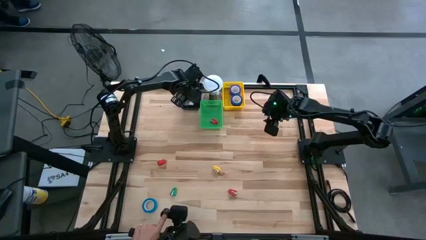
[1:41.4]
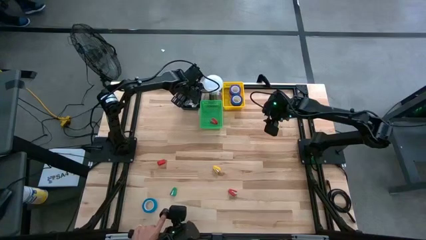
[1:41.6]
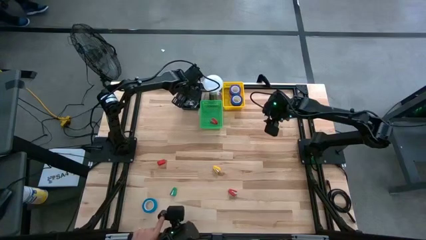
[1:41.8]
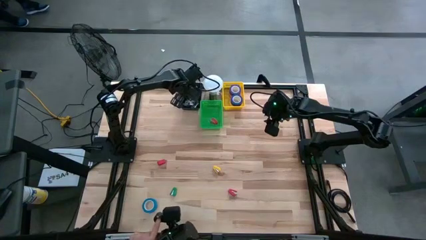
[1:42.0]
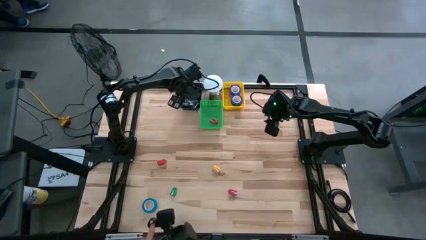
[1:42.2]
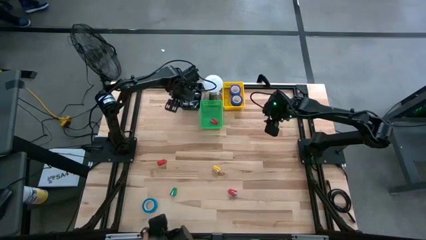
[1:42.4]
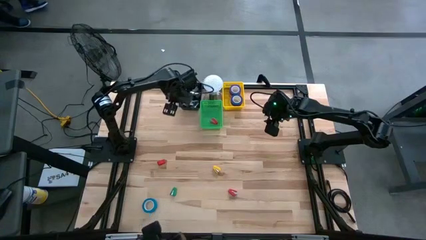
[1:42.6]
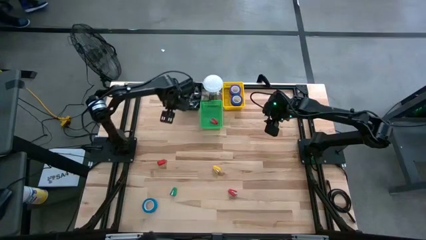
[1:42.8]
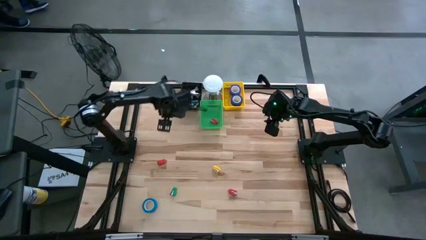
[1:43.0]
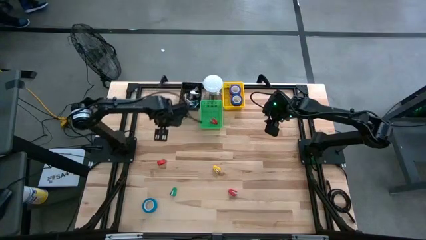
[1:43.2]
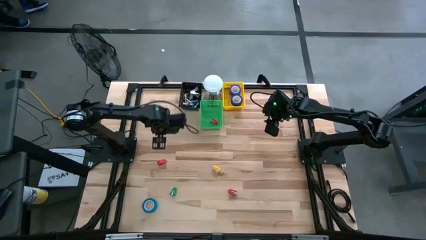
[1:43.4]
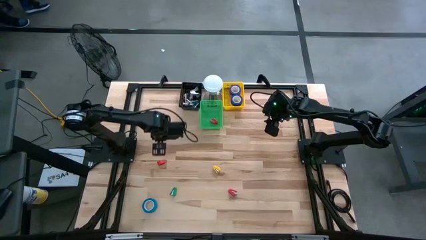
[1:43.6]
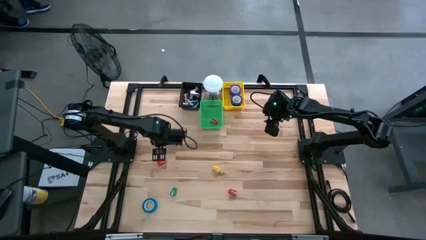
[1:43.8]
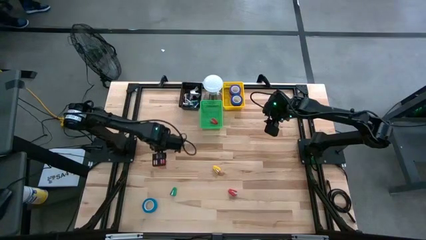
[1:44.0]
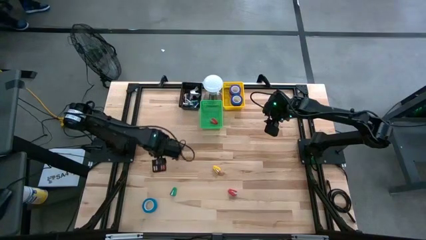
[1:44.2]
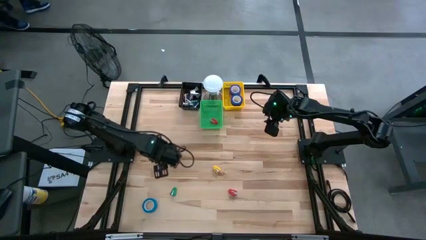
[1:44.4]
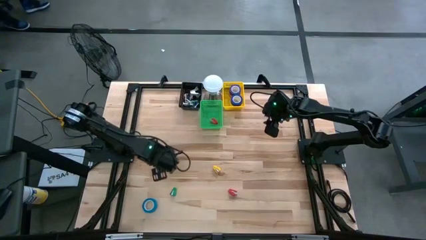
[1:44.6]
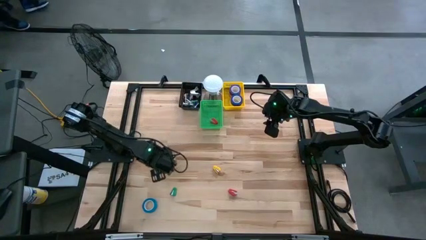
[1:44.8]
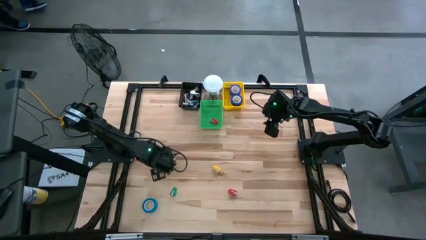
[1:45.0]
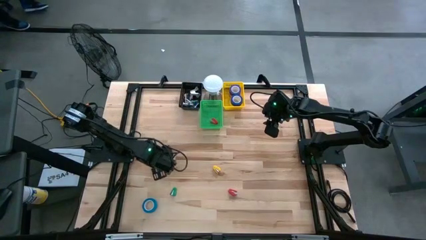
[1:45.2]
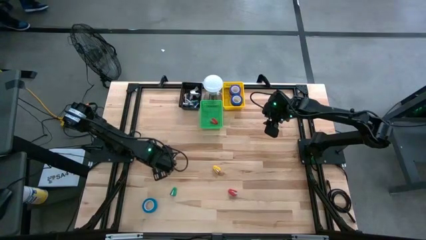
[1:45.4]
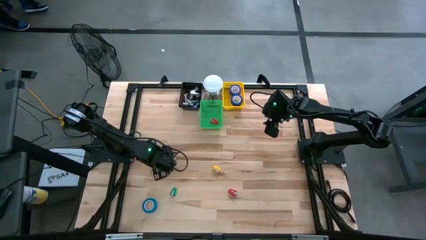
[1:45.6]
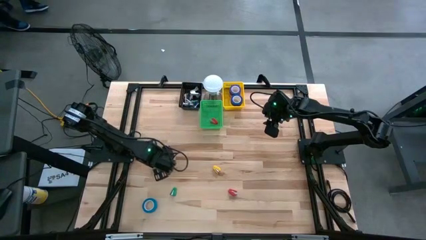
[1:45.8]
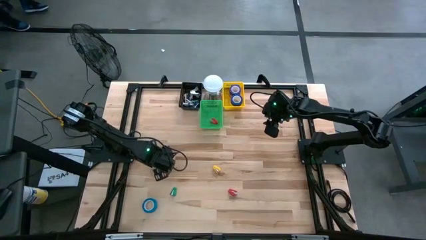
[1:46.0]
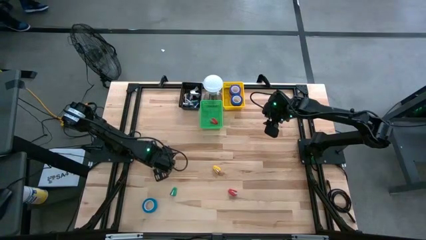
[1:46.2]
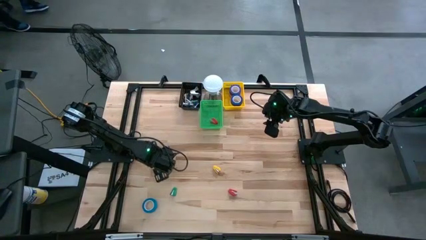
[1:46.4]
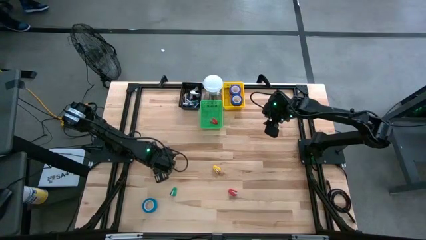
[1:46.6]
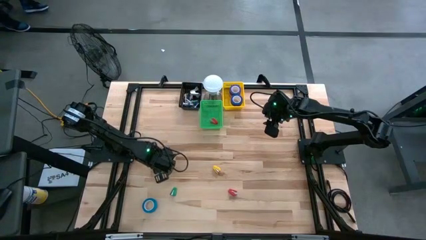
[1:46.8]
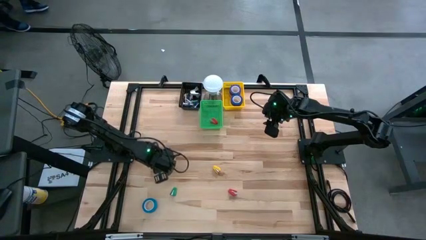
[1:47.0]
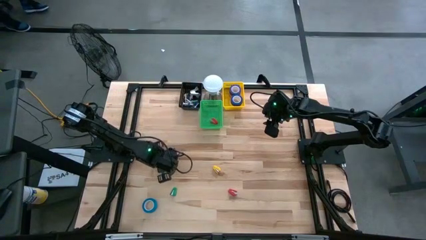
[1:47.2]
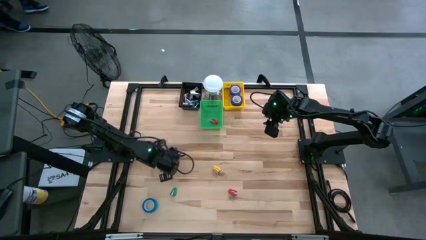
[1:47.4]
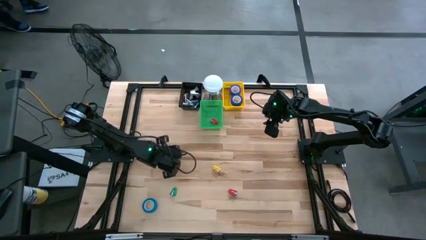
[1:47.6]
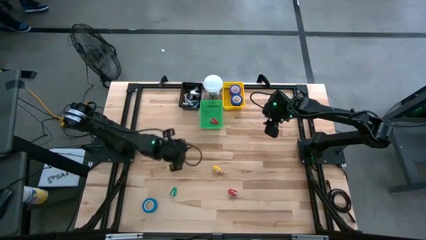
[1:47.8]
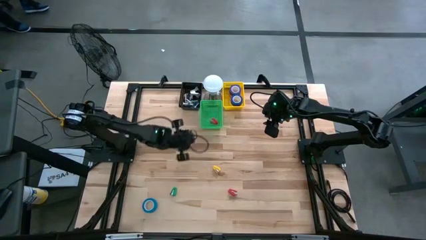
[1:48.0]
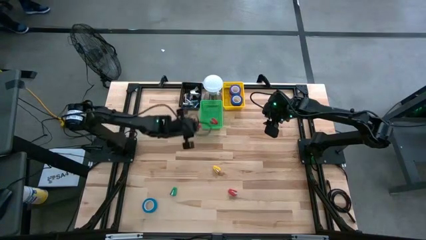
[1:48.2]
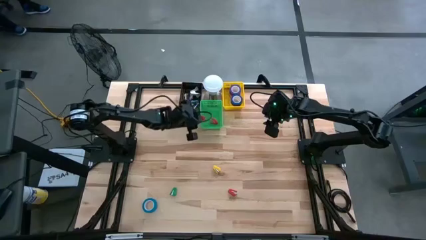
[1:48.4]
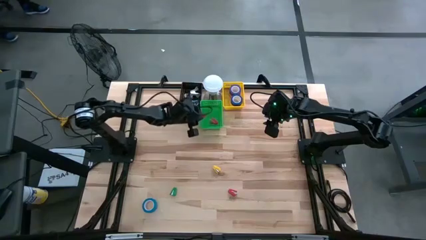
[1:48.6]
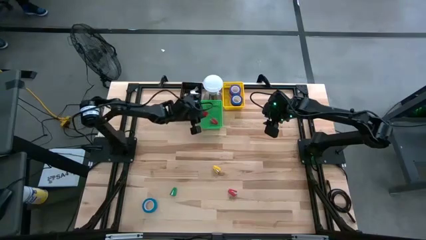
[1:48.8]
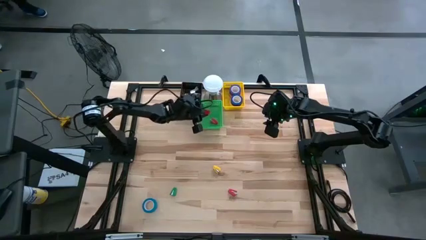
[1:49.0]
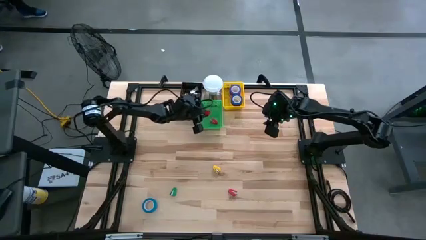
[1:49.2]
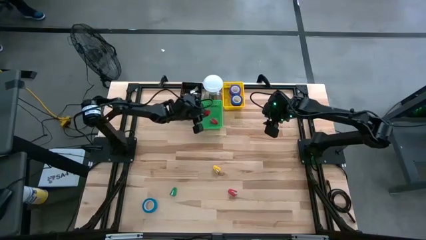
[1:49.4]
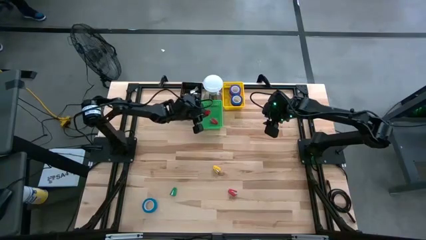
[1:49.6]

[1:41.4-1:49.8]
Task: Pick and place Stapler, Stapler remover, tape
Put the left red stapler into the green bin

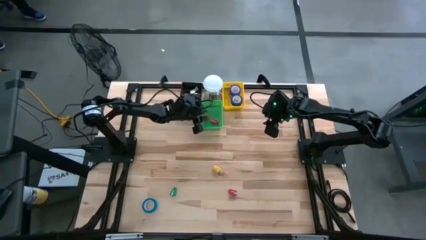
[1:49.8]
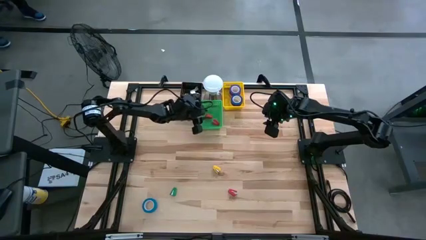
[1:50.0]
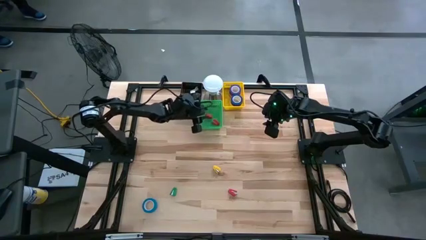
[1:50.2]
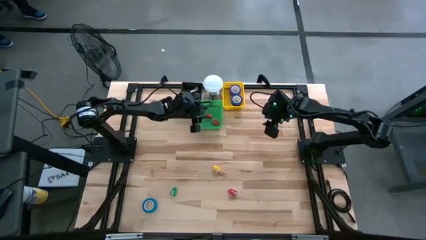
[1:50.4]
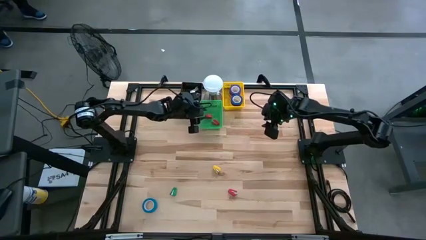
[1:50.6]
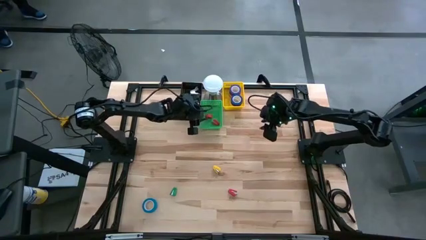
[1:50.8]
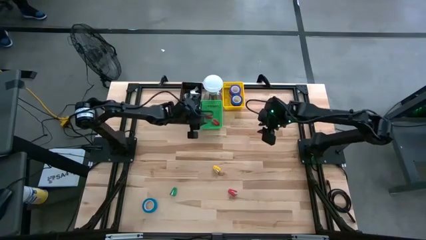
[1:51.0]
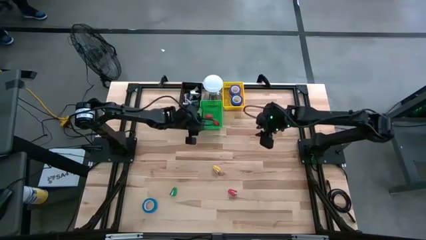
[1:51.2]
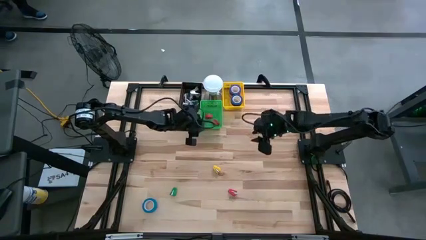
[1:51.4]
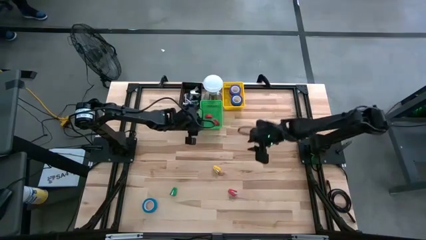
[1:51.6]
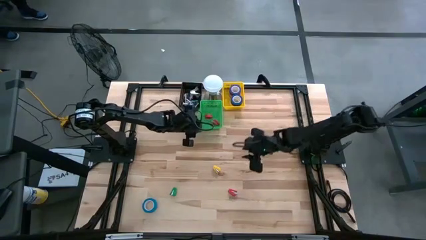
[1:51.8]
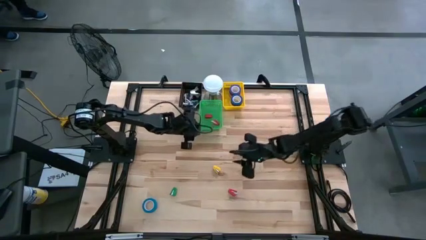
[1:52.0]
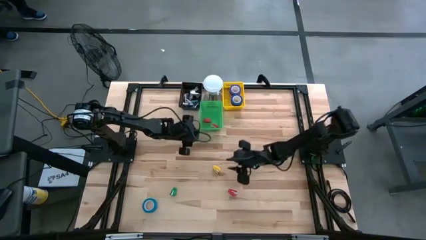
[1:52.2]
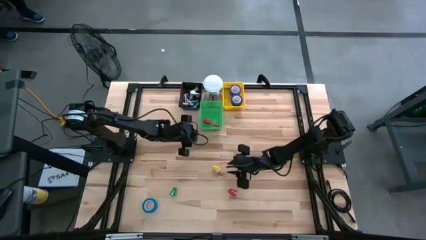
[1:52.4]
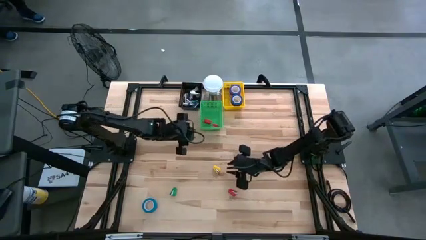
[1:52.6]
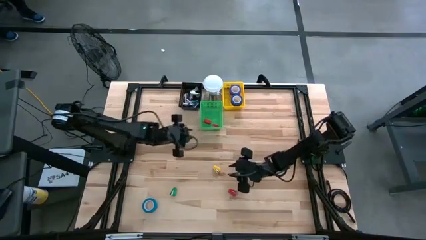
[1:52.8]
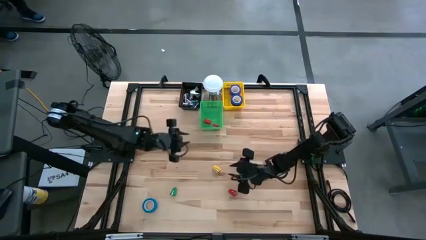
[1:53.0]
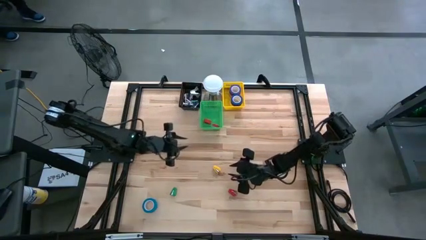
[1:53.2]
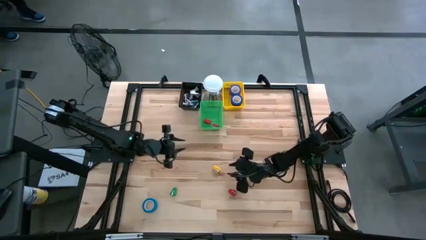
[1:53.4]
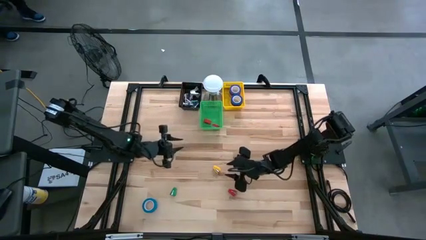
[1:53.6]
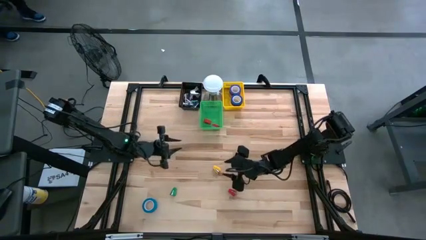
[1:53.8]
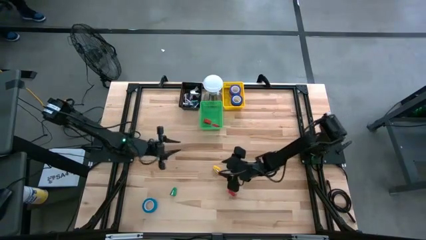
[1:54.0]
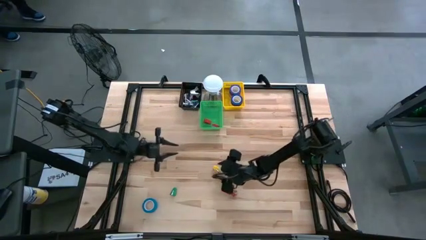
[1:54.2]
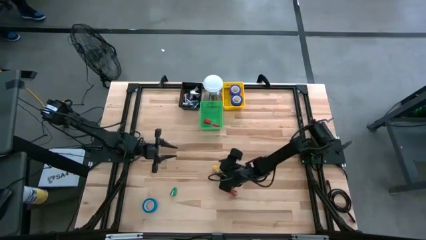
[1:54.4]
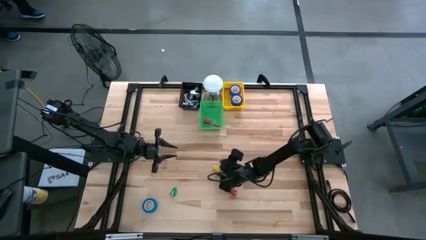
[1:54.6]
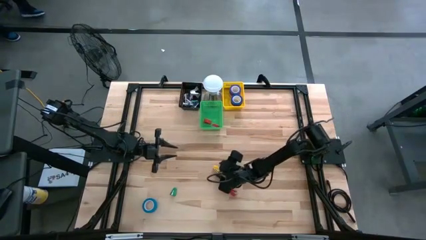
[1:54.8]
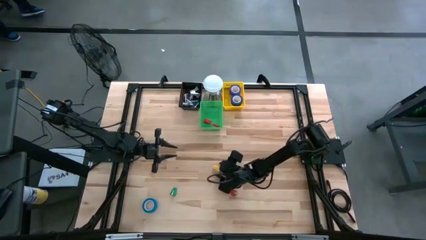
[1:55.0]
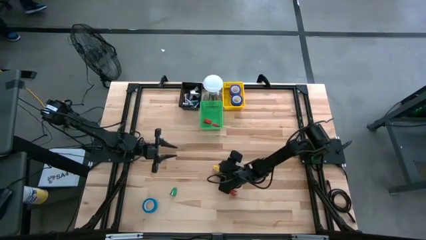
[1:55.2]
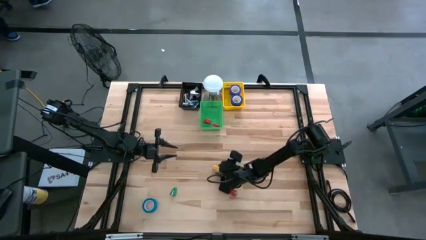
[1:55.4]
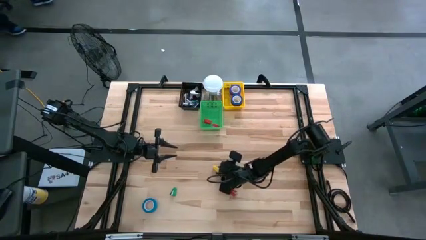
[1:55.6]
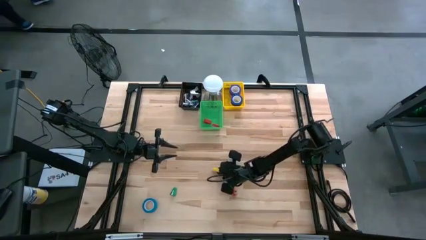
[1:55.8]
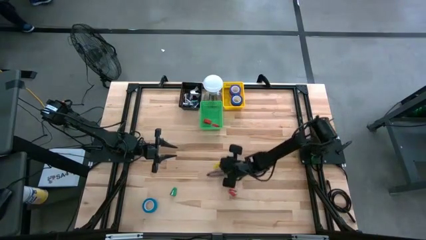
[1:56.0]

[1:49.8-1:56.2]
Put the yellow stapler into the green bin

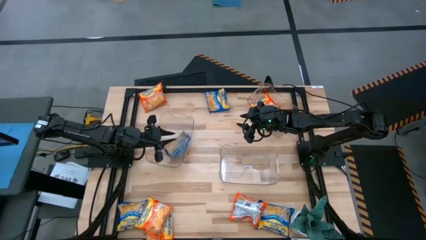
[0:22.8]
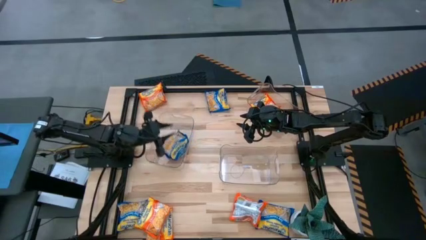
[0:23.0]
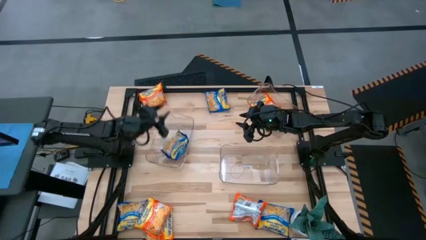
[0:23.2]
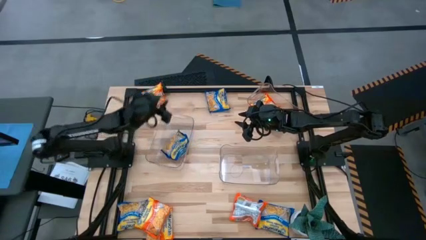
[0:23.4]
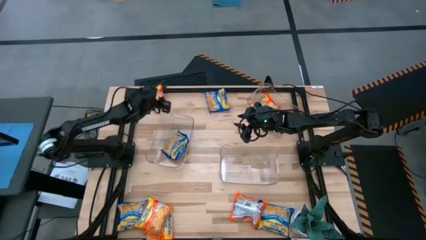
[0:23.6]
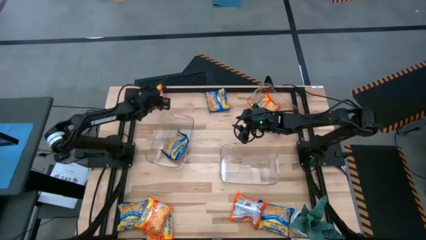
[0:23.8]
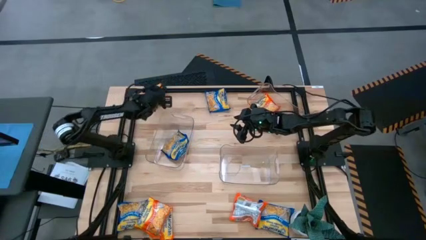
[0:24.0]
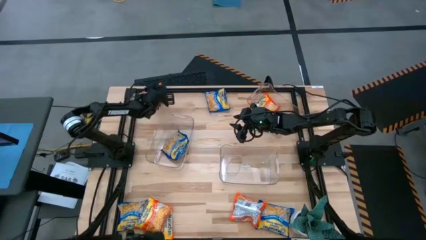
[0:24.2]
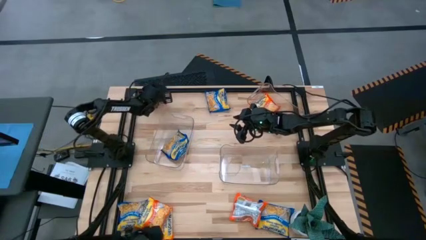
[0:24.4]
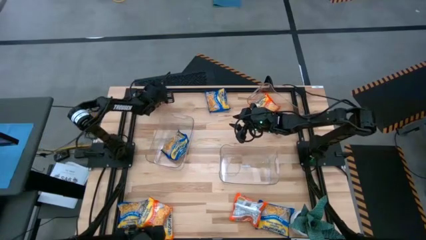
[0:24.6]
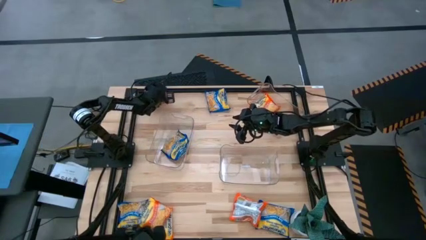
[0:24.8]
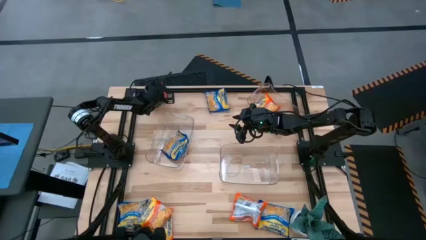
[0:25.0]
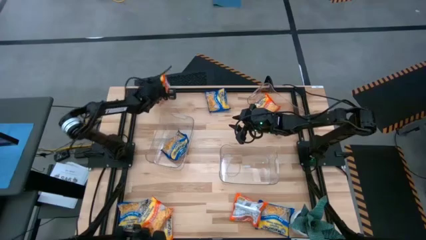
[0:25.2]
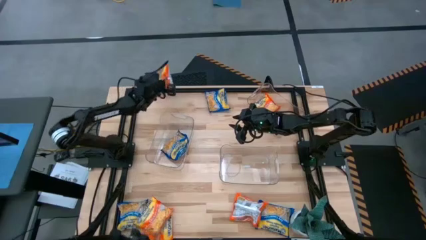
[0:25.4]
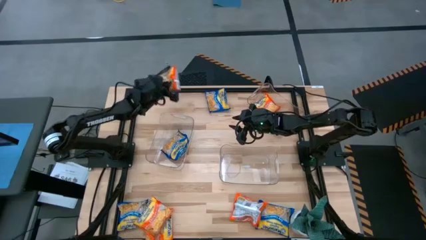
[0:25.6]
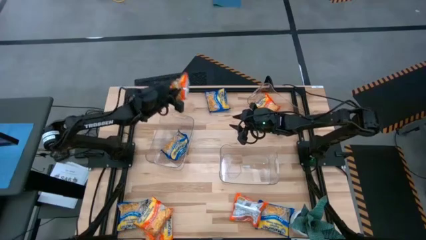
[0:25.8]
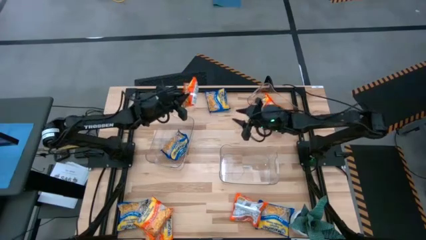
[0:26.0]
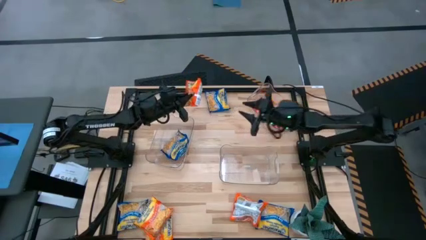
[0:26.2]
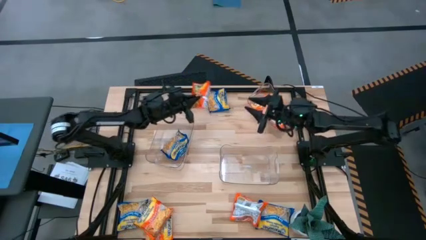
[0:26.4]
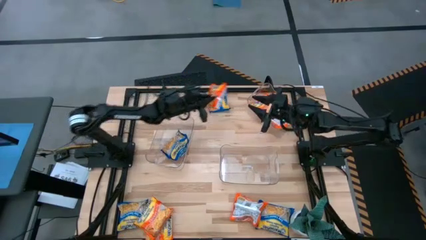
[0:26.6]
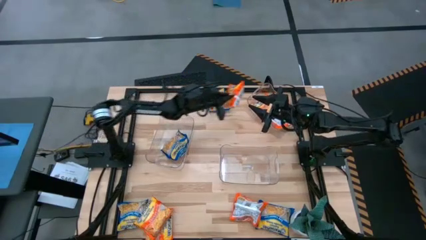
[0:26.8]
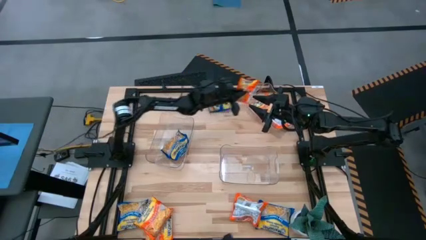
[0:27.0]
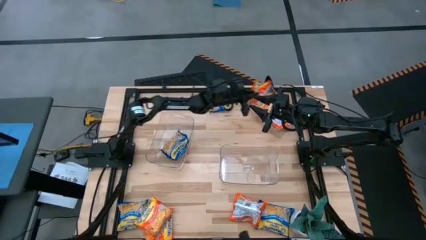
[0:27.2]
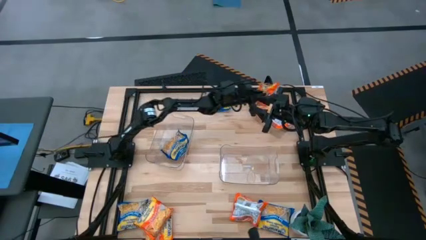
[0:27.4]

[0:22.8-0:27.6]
Task: Sort Maruchan noodles
Put the orange noodle pack into the top transparent bin
